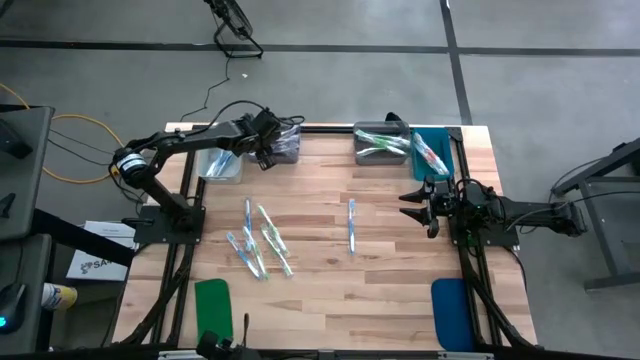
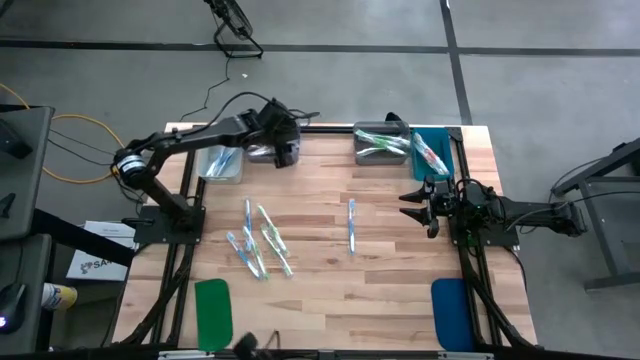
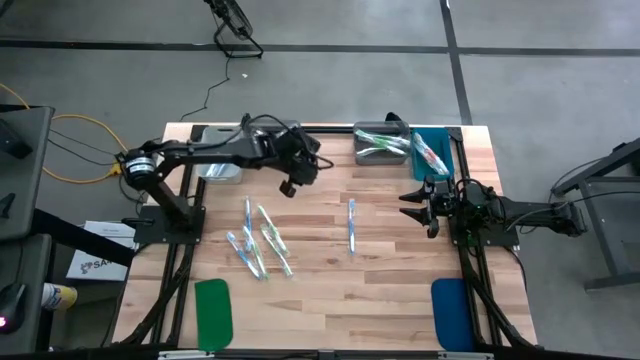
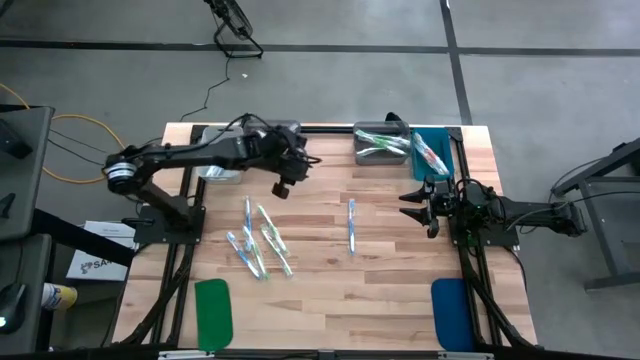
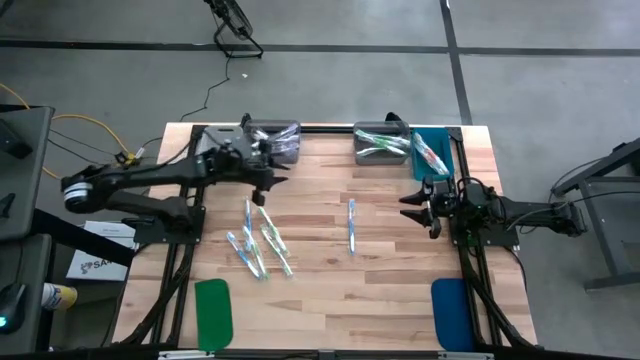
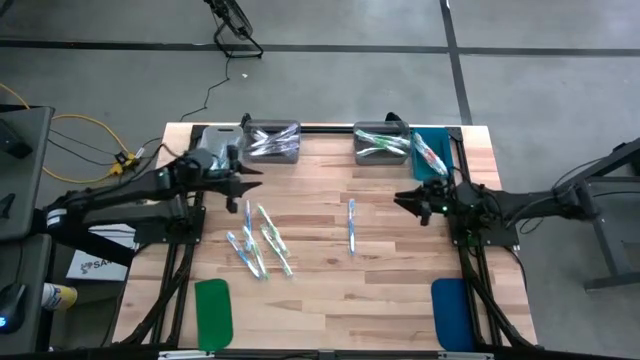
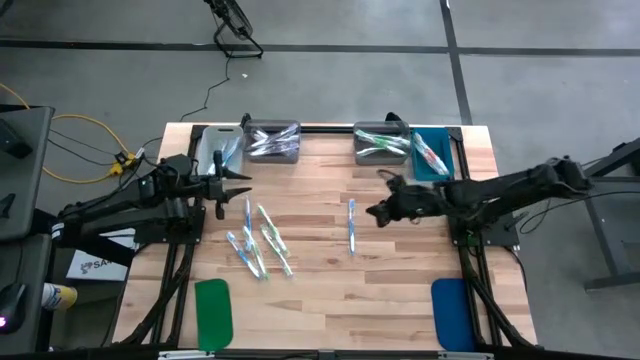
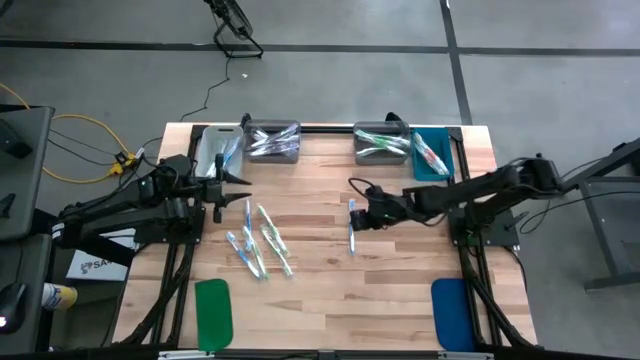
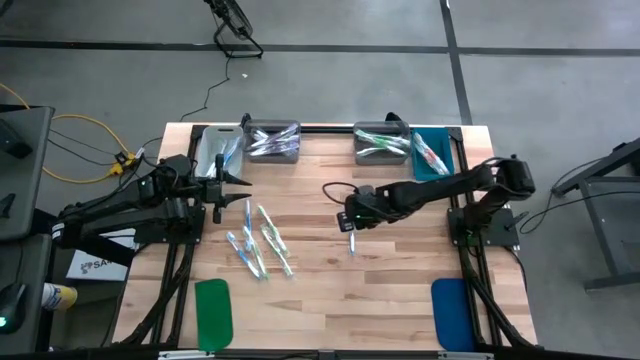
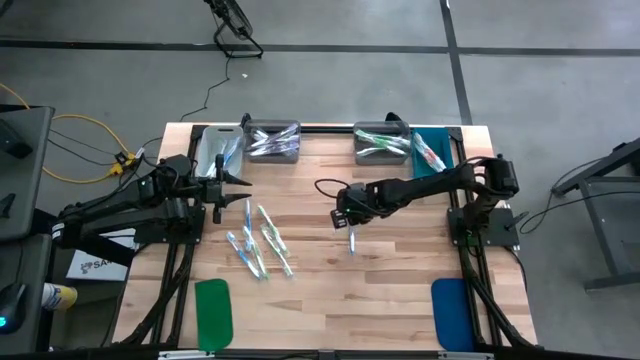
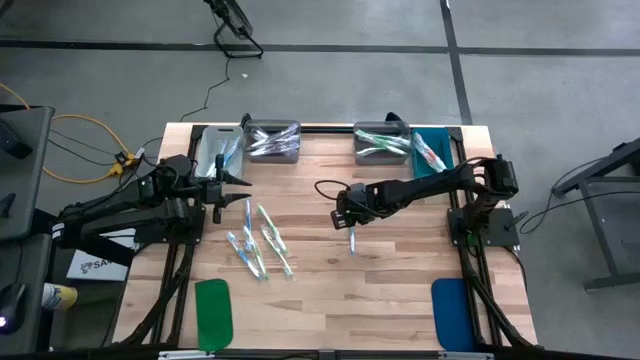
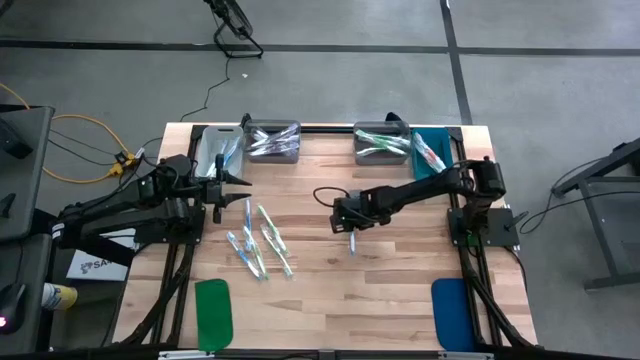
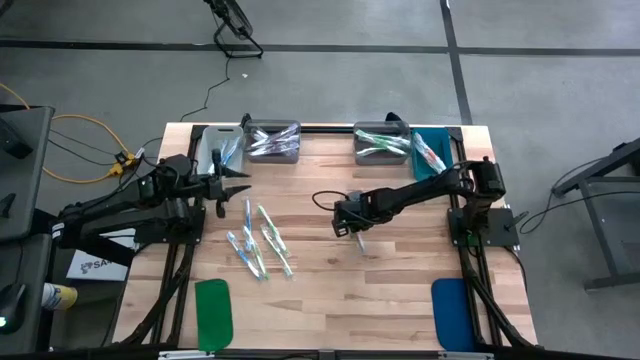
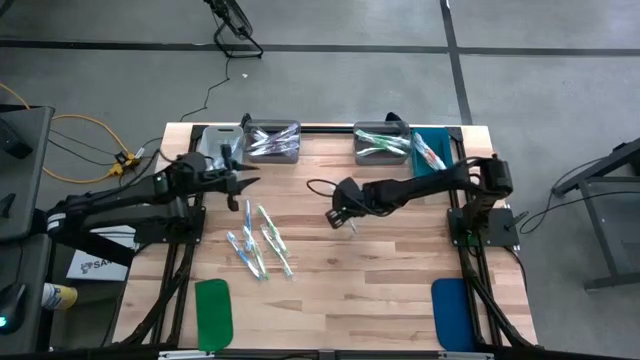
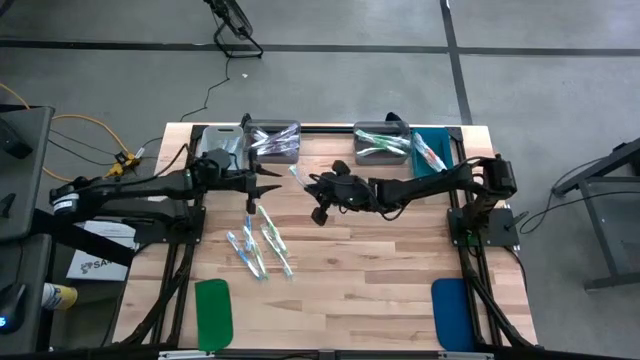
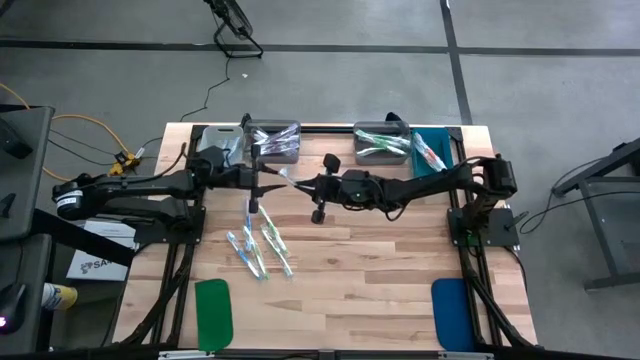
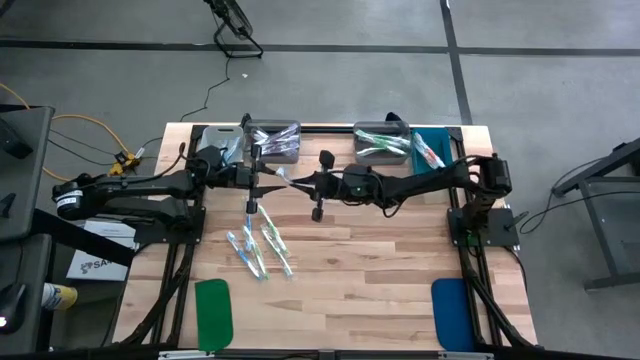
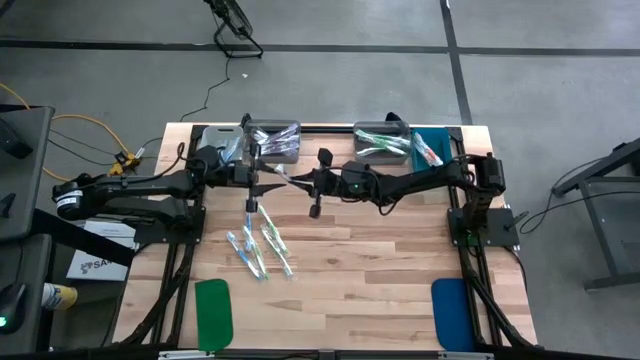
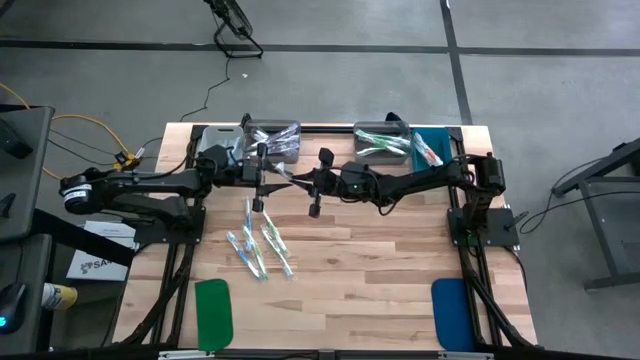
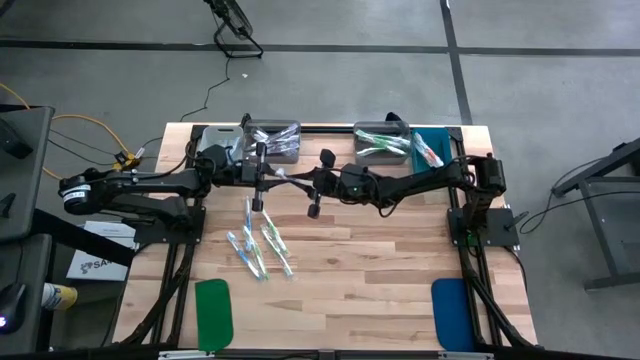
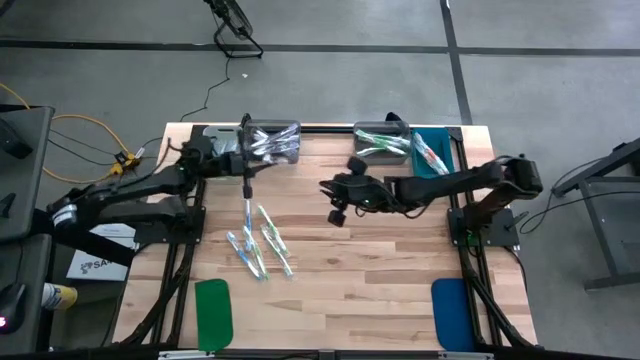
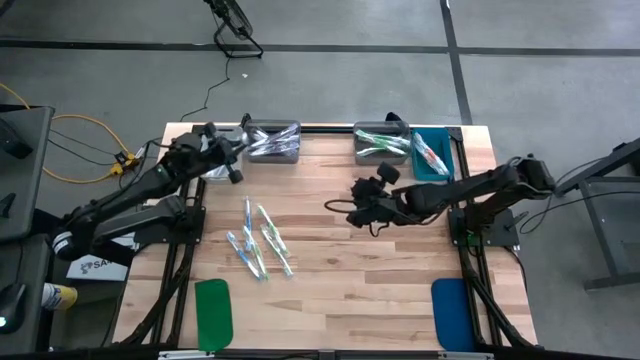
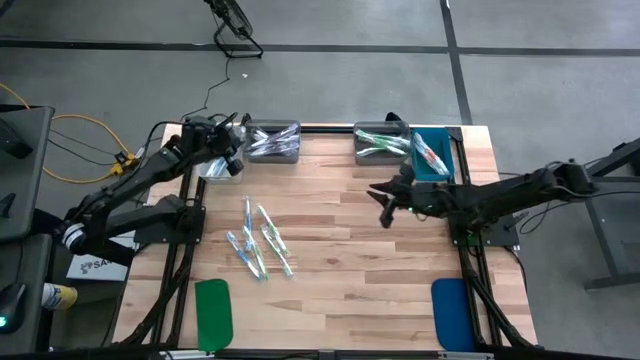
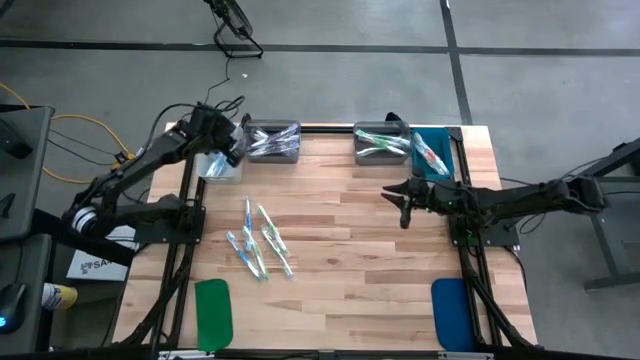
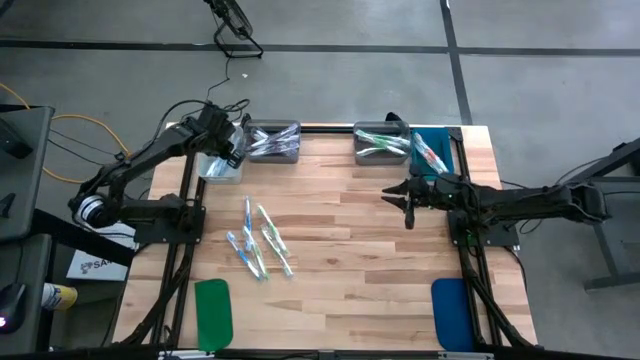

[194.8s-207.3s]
Task: Pick & Place Toothbrushes
Put the blue toothbrush into the white bin

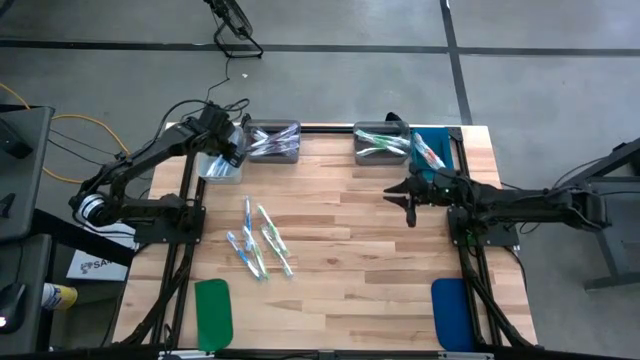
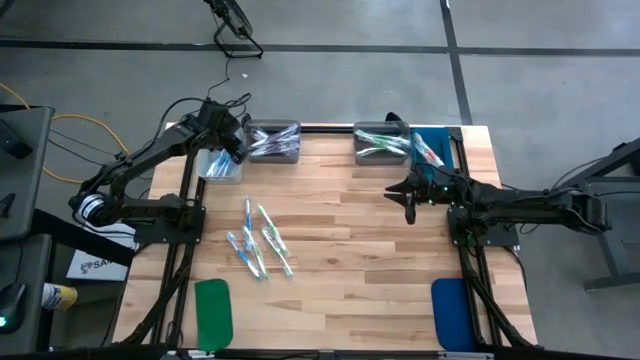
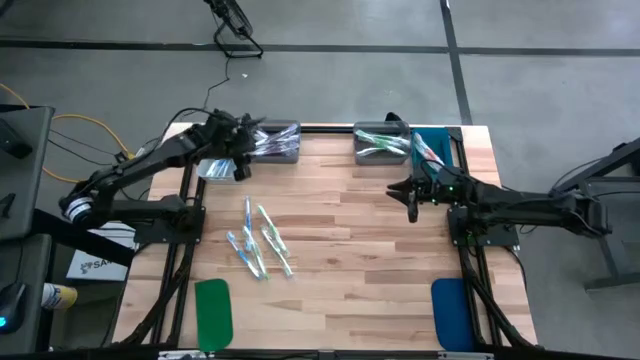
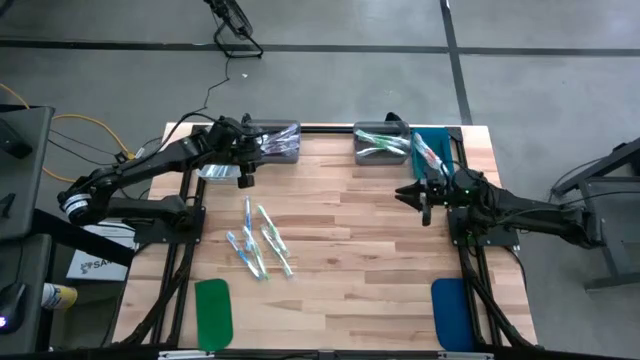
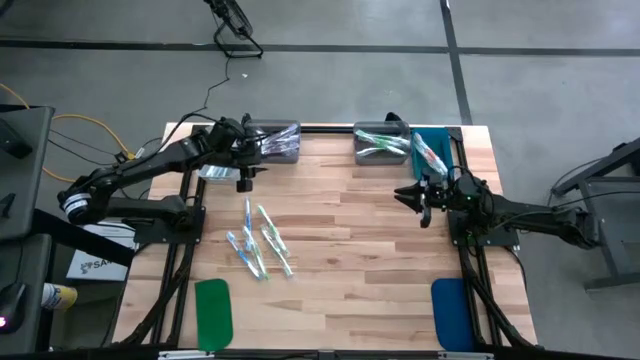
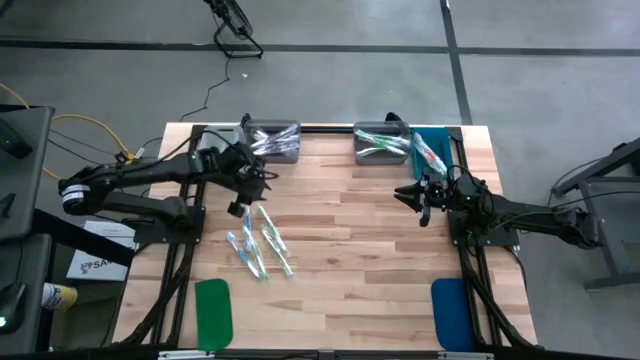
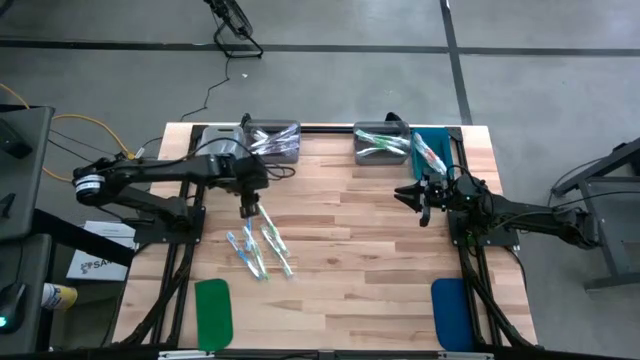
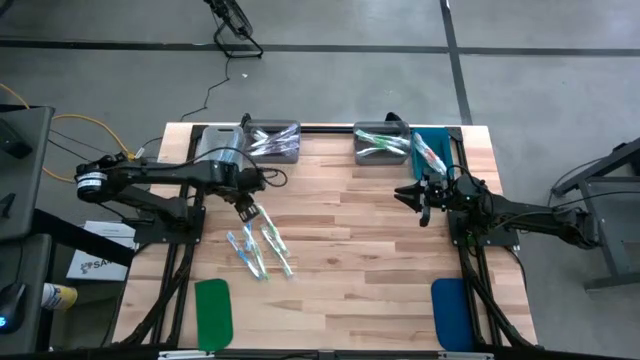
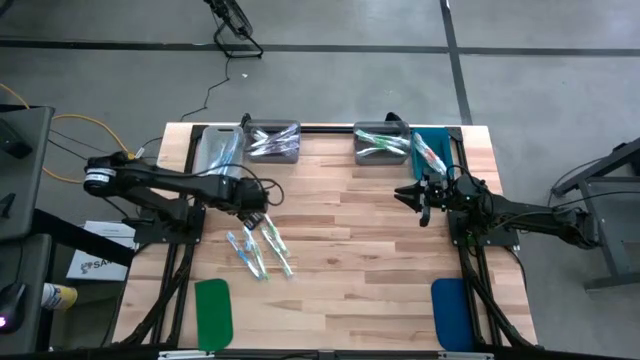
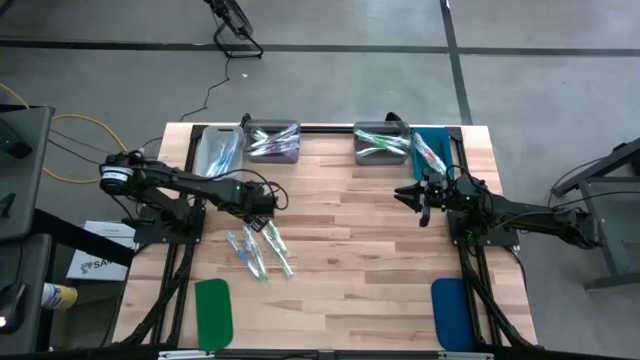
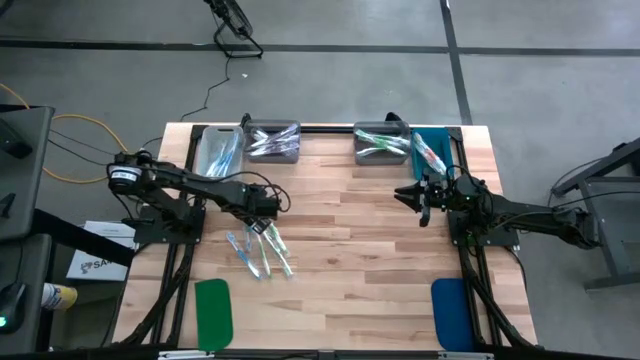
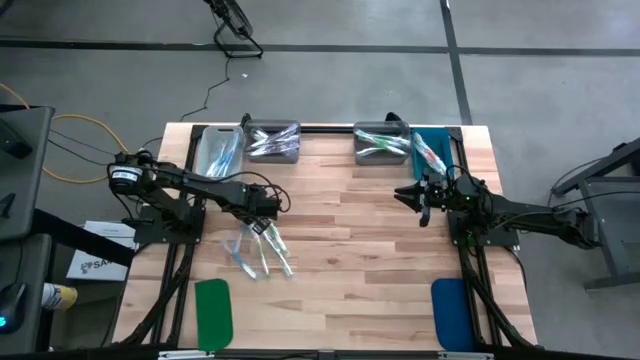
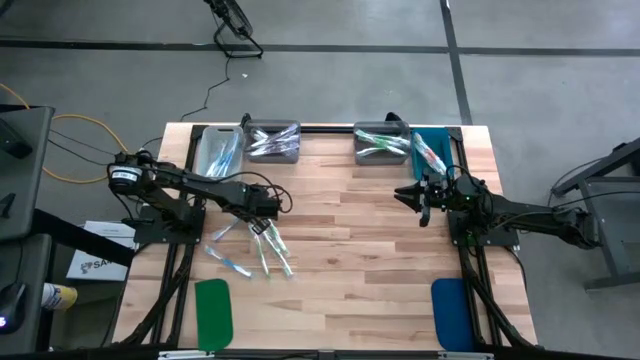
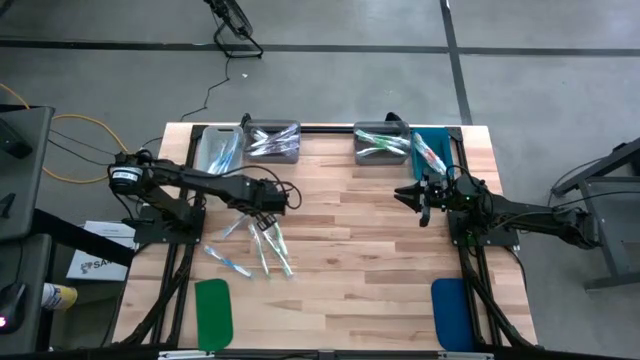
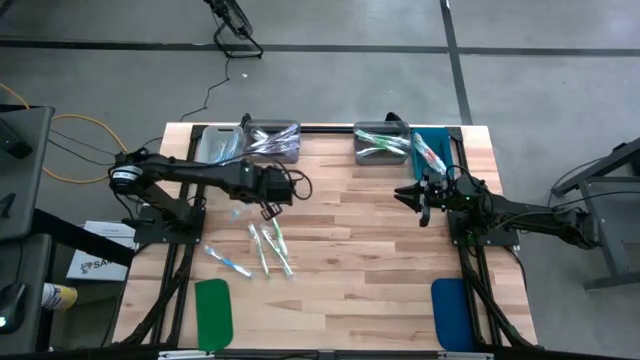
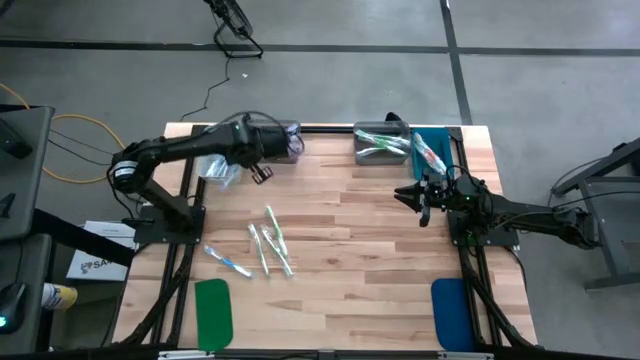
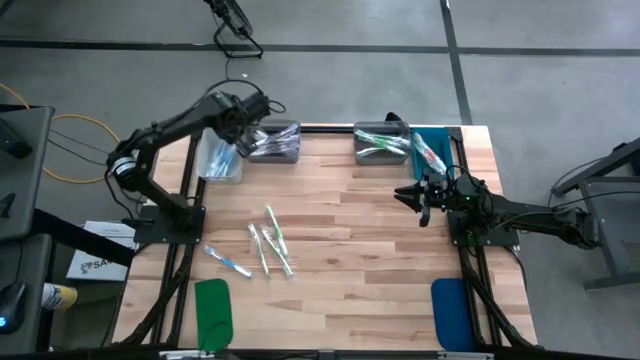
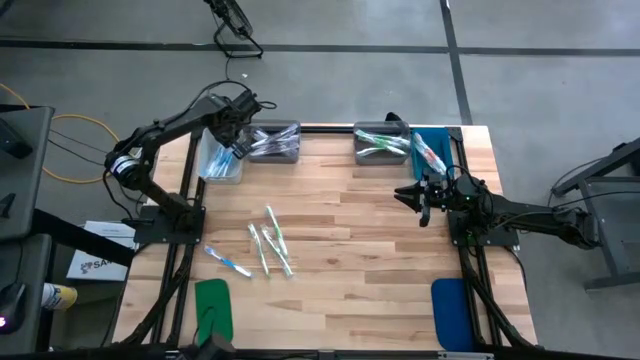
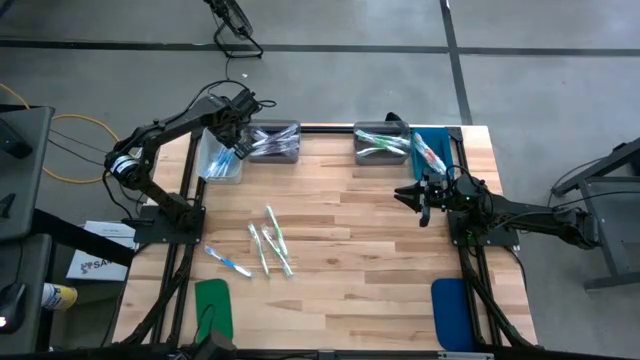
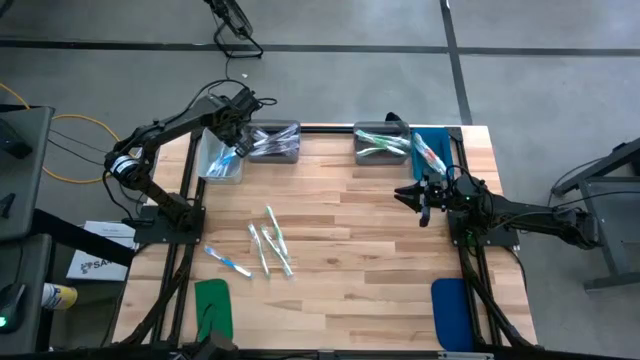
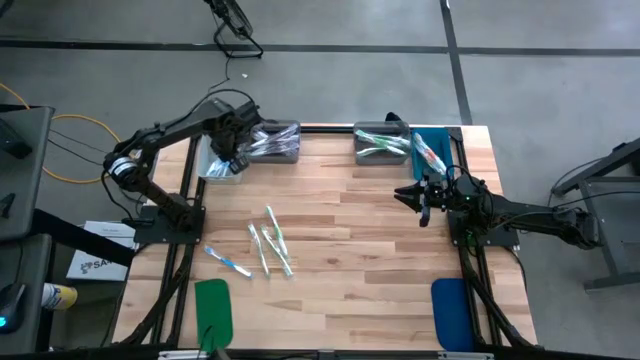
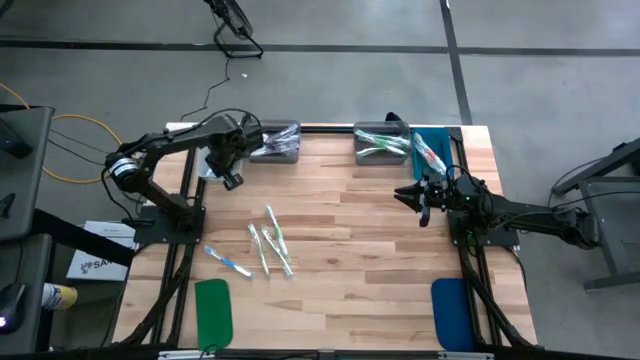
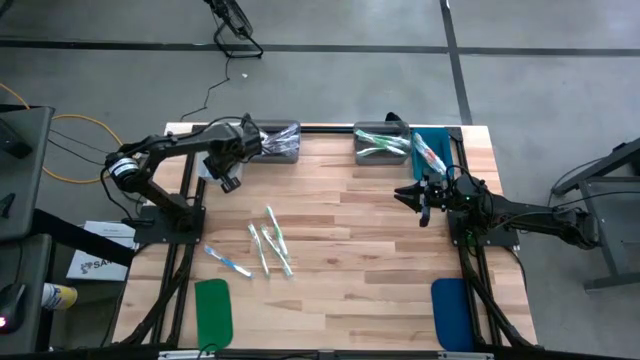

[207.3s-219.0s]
Put the blue toothbrush into the white bin
